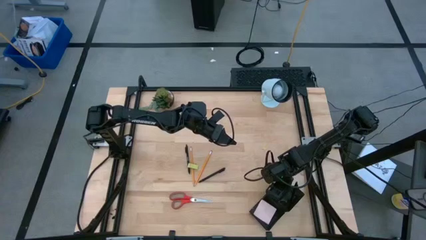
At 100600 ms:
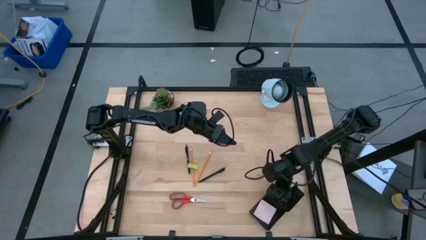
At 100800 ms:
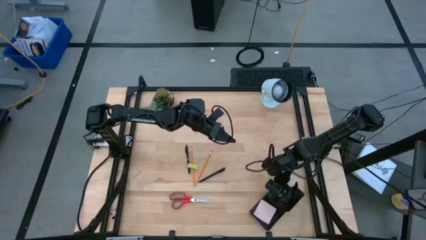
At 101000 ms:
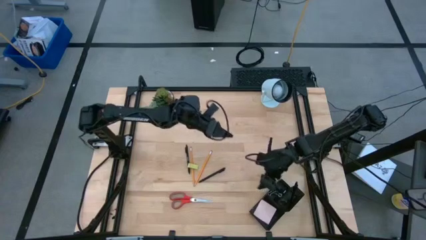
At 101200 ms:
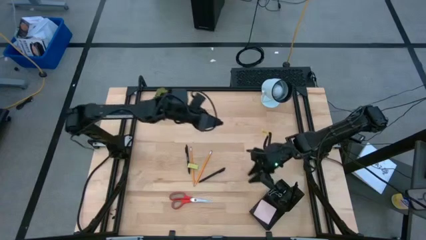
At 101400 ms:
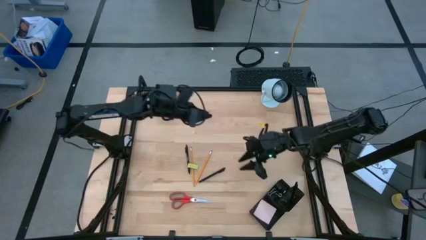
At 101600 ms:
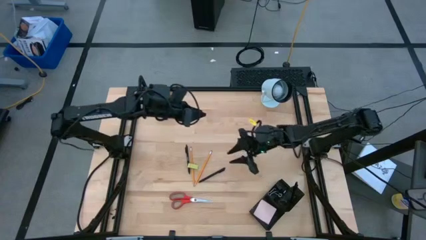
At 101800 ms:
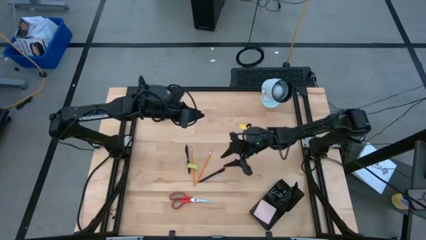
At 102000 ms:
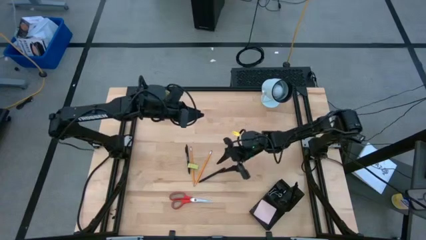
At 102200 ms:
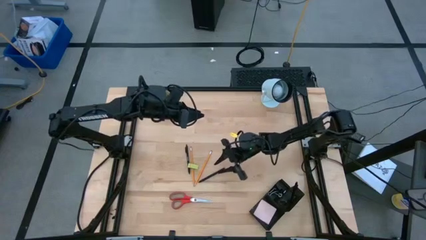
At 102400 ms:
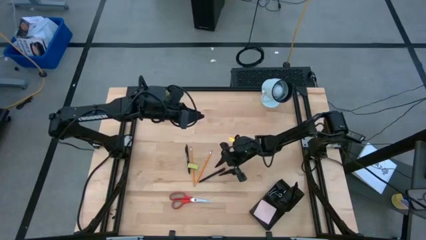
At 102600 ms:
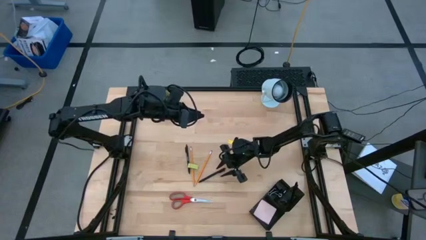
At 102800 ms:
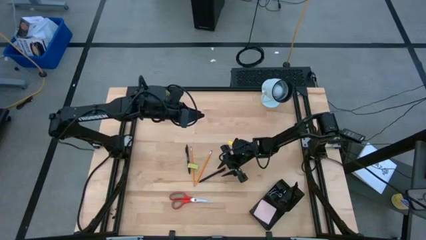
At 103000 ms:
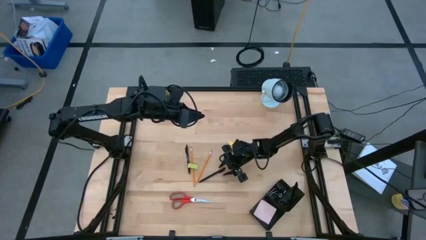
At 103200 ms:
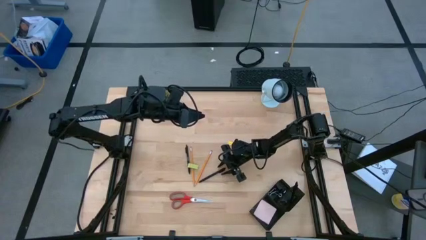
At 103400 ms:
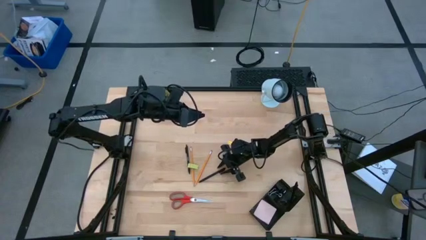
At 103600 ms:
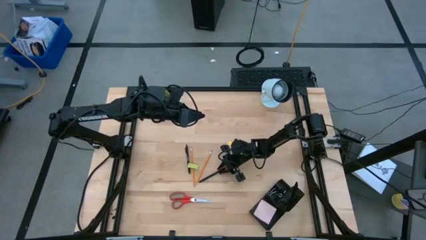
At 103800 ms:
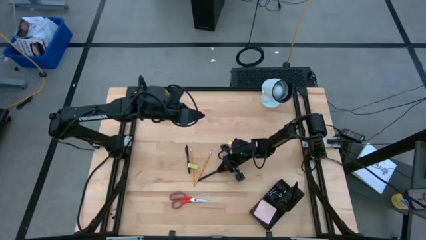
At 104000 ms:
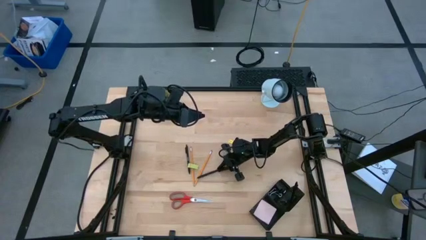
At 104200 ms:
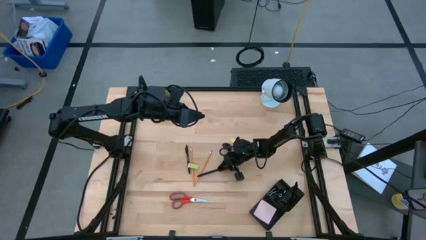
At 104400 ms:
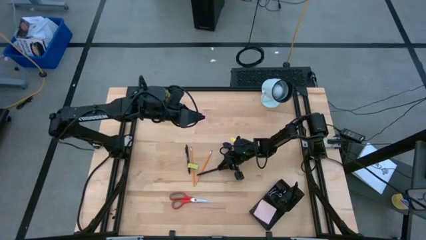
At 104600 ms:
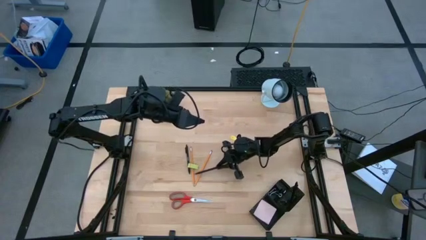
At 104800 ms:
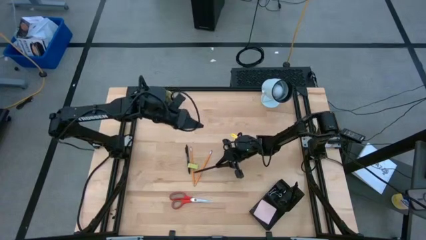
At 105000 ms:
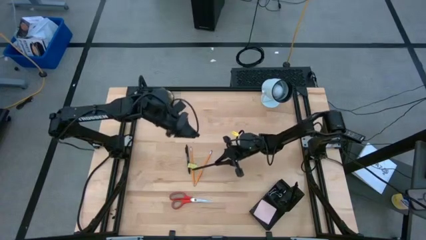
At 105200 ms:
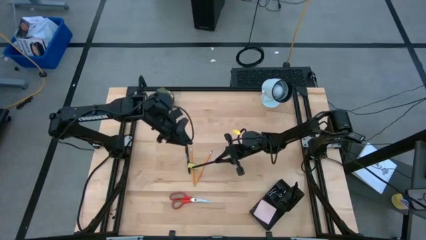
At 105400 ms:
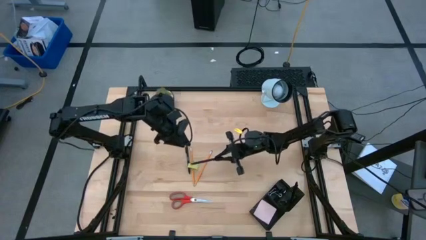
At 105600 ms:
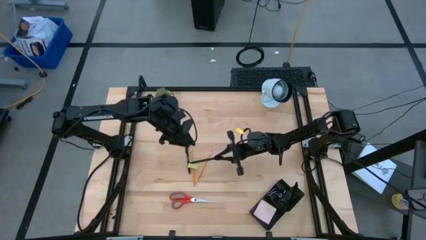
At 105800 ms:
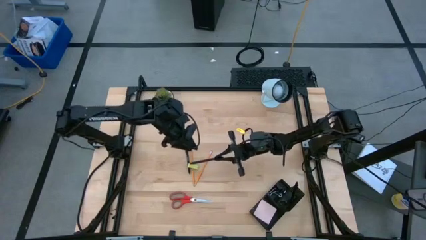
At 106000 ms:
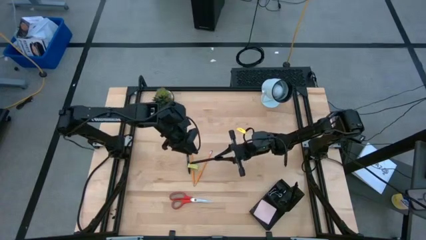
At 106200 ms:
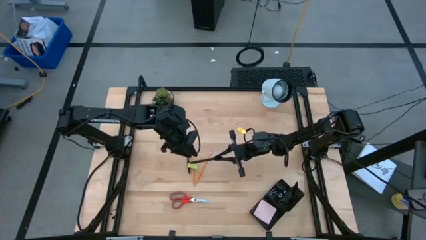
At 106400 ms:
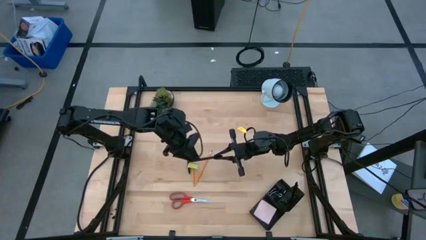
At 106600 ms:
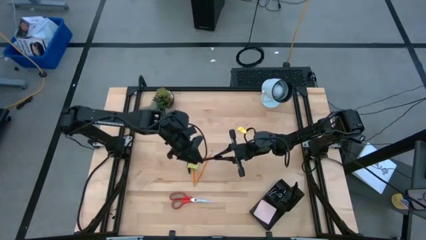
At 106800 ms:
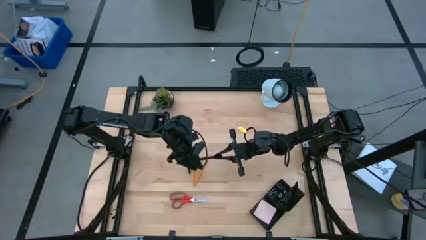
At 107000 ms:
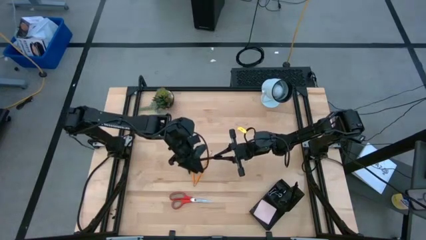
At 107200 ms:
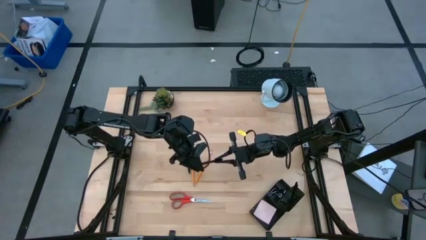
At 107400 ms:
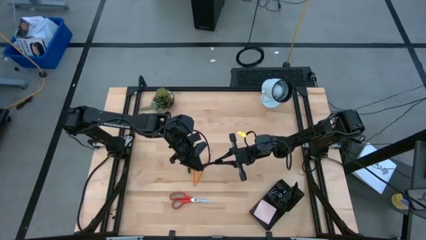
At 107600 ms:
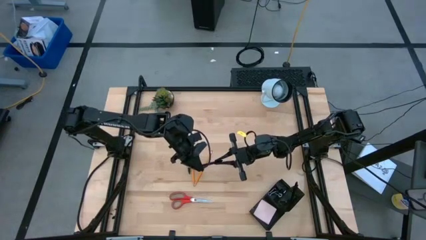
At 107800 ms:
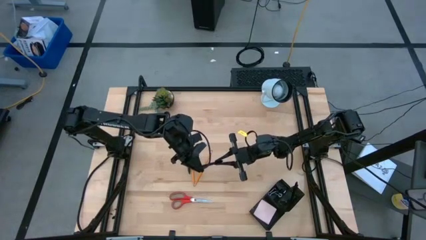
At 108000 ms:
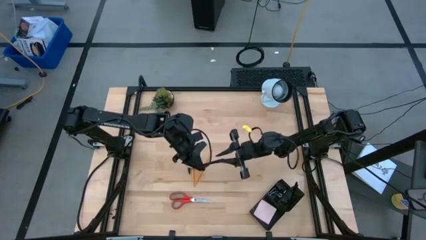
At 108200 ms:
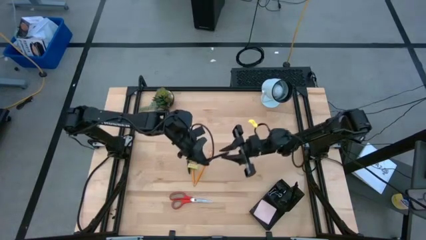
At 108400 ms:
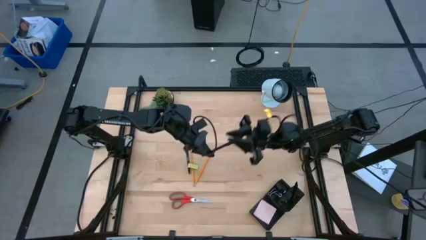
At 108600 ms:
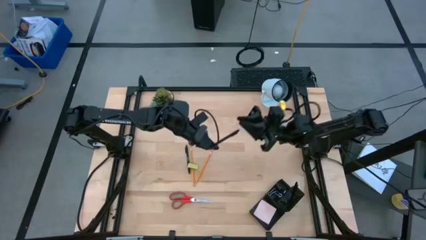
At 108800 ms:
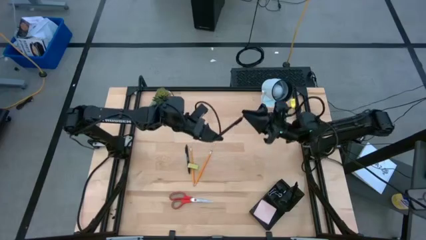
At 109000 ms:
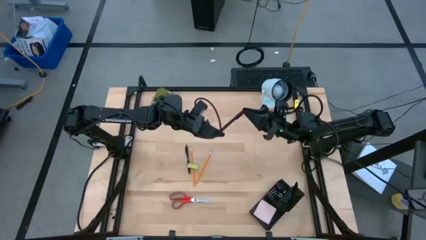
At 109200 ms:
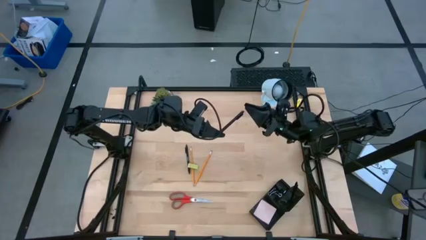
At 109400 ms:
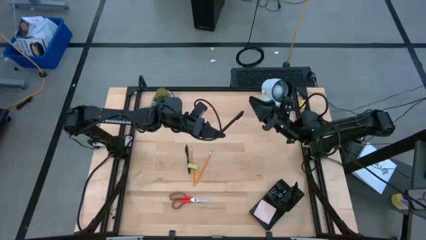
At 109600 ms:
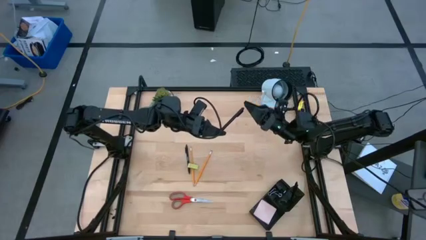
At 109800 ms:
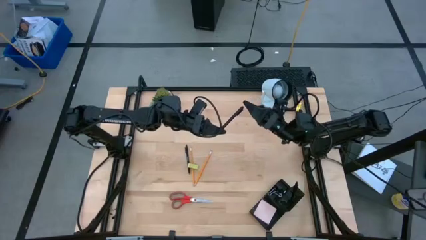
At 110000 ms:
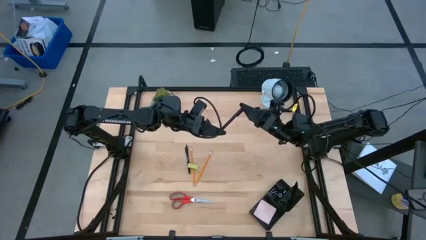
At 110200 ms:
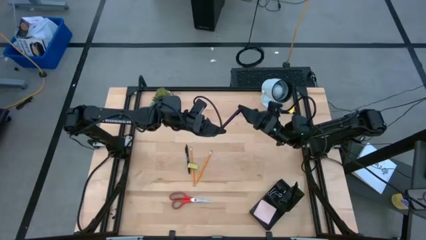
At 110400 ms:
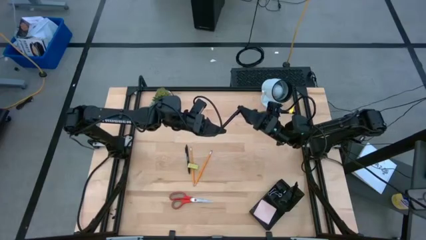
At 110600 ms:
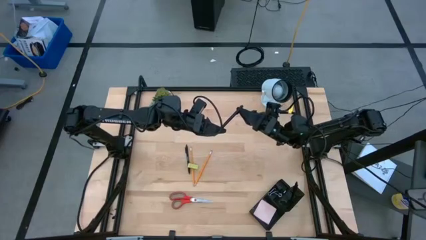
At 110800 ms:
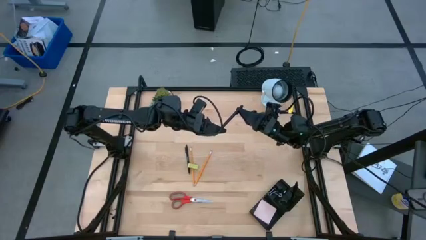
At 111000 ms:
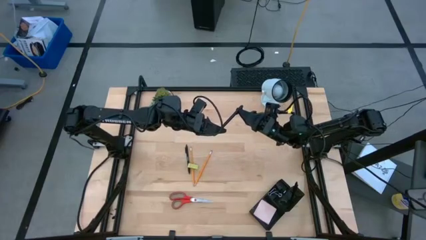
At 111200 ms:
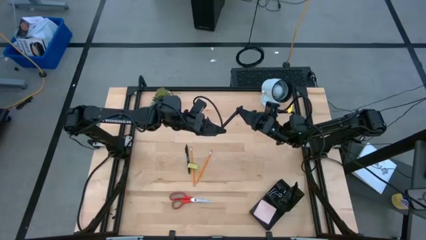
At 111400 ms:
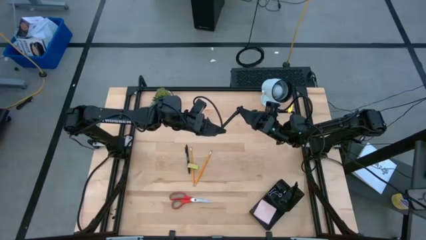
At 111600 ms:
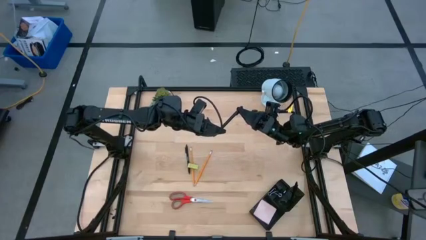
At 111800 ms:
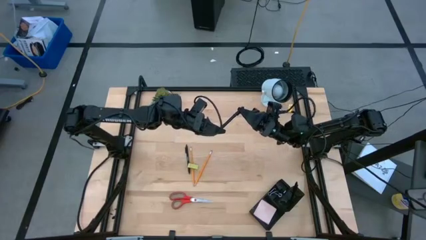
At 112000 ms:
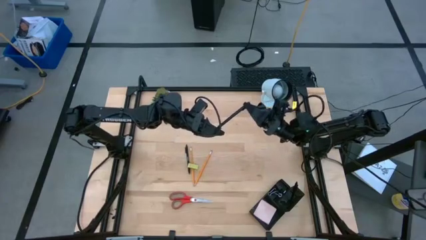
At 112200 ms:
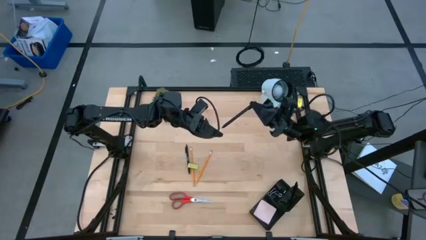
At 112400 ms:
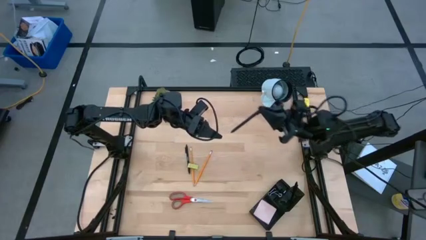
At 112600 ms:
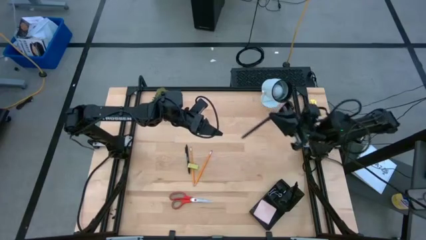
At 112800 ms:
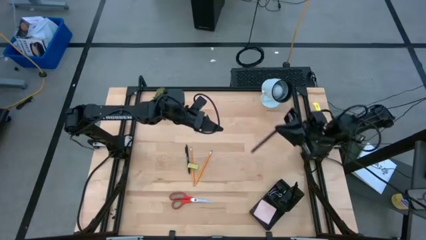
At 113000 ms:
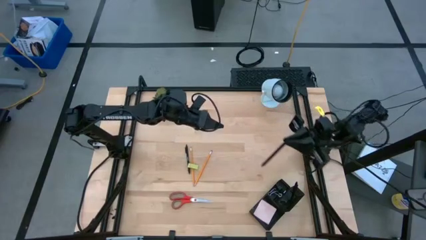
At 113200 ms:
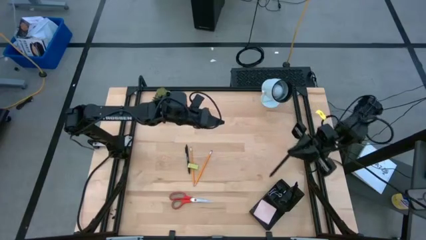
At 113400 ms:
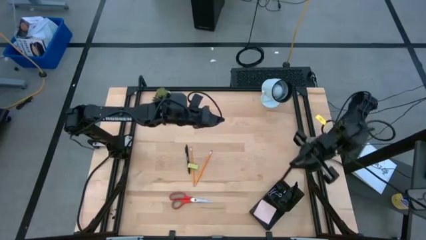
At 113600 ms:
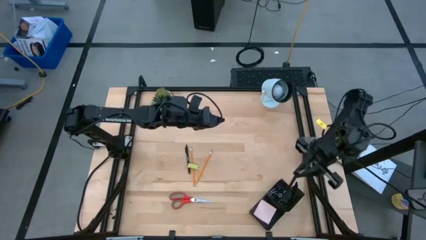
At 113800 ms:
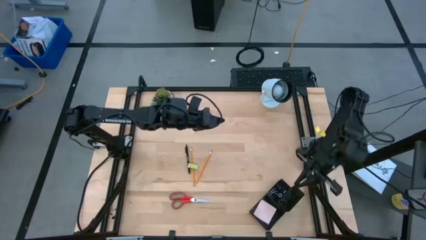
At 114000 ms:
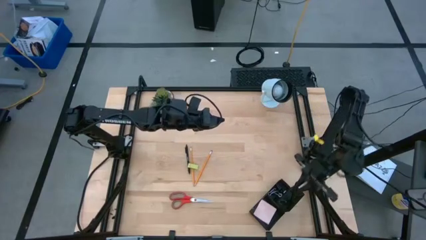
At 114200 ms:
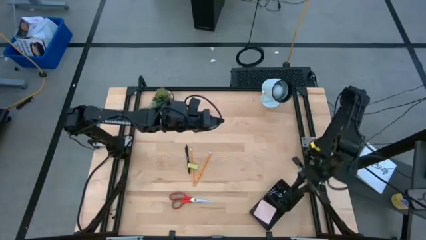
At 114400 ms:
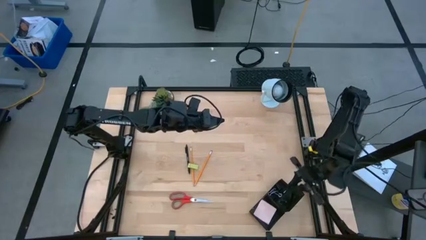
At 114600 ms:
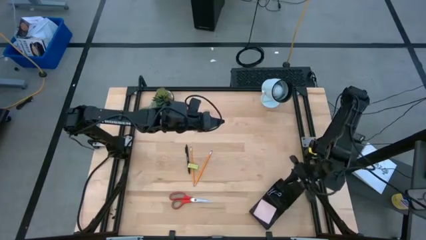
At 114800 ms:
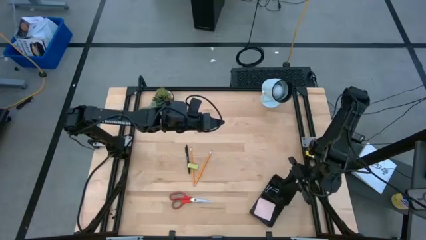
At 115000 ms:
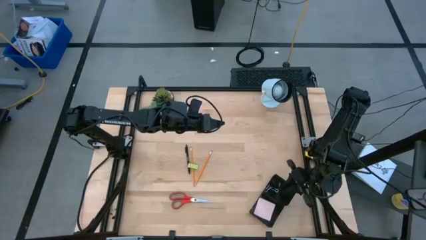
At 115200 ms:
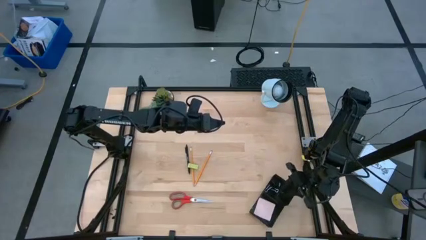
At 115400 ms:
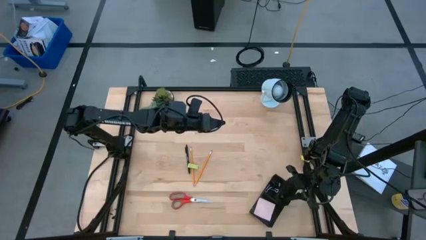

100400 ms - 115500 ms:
Task: Pick and place office supplies into organizer
Put the black pen into the desk organizer

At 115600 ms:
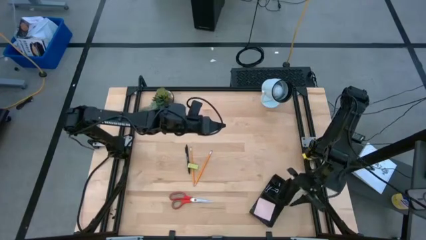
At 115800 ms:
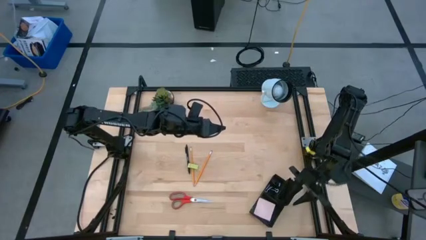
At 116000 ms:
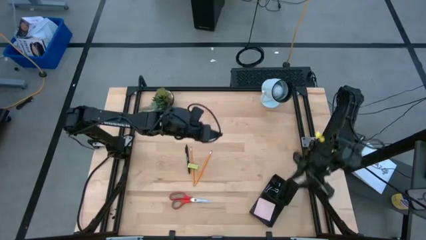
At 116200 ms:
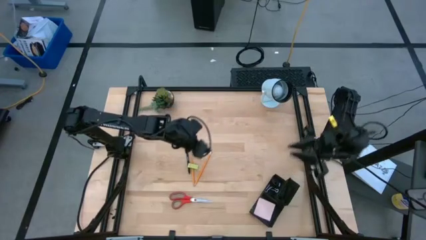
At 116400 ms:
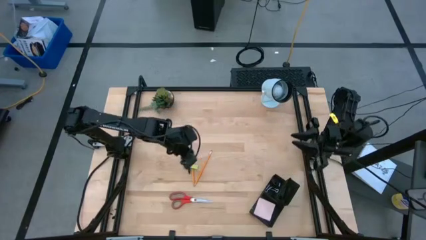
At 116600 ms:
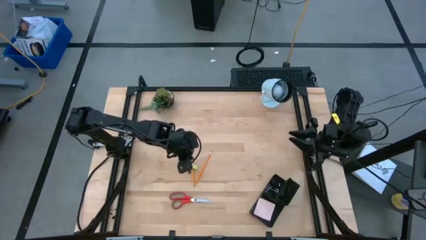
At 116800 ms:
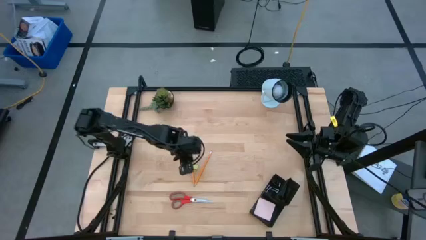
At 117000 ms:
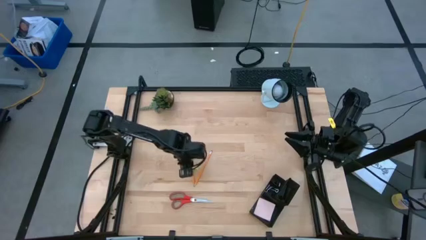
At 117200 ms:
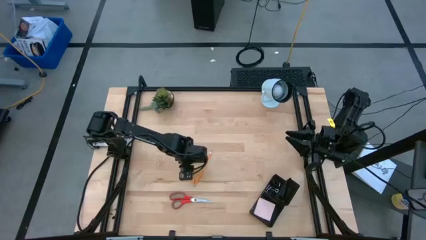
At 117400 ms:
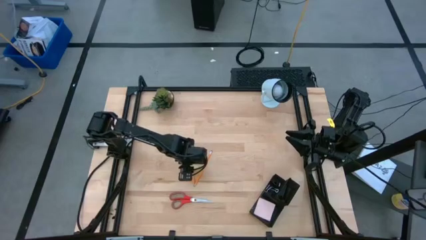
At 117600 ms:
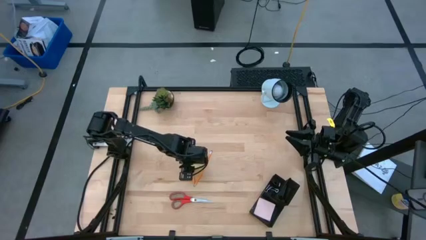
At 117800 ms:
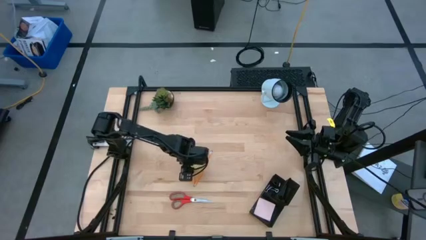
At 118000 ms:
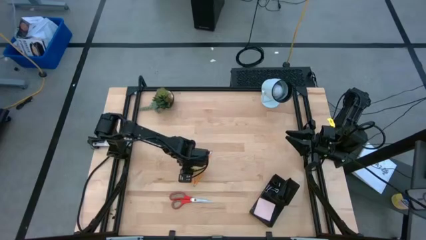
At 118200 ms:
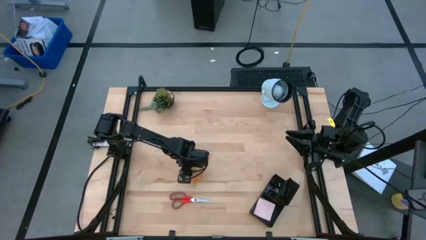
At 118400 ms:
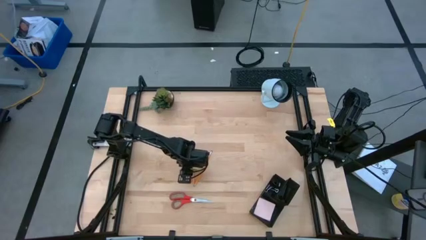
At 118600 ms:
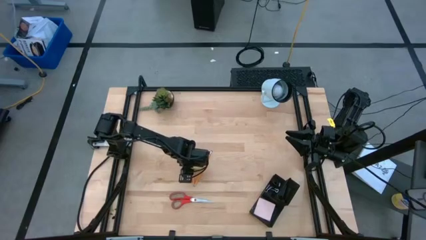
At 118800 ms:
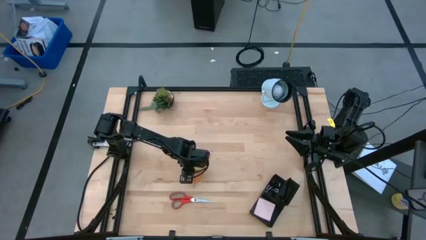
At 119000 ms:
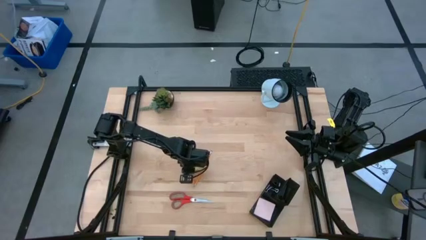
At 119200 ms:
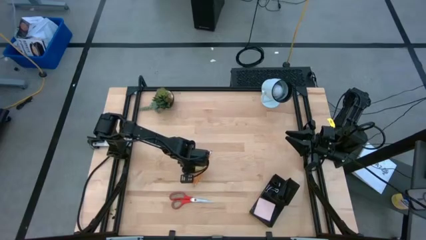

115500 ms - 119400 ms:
Put the green eraser into the desk organizer
